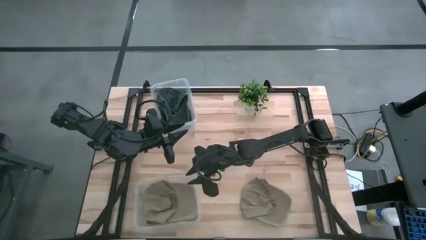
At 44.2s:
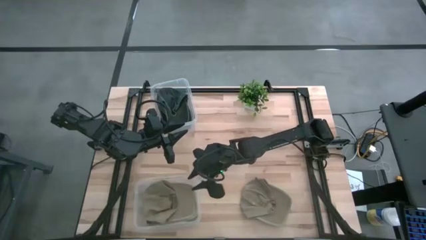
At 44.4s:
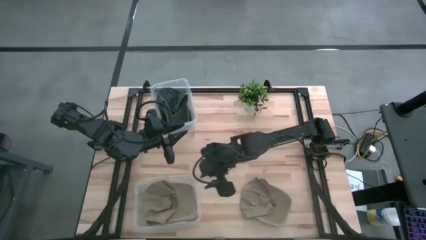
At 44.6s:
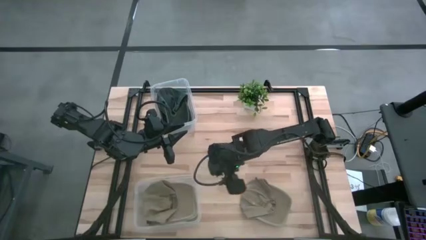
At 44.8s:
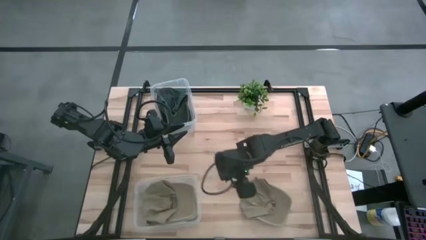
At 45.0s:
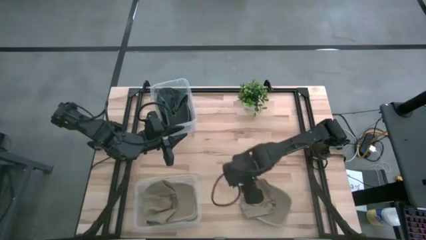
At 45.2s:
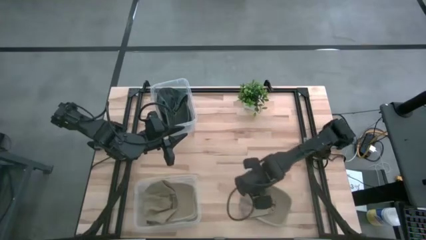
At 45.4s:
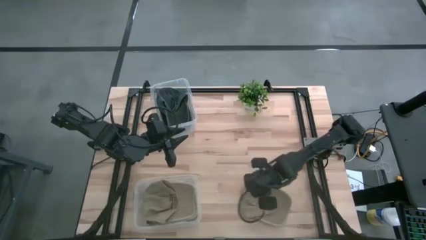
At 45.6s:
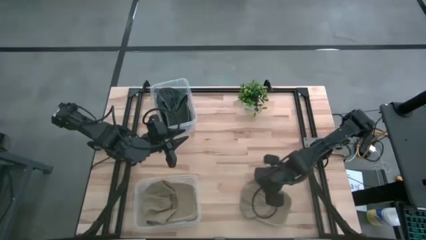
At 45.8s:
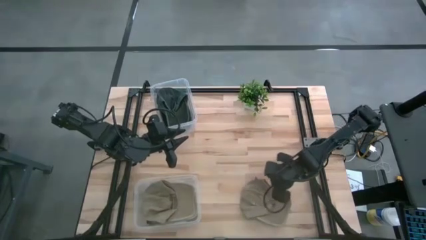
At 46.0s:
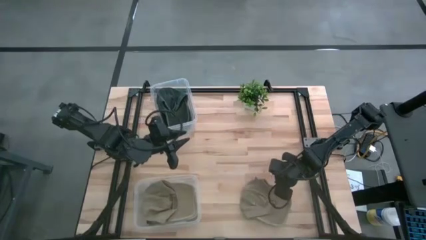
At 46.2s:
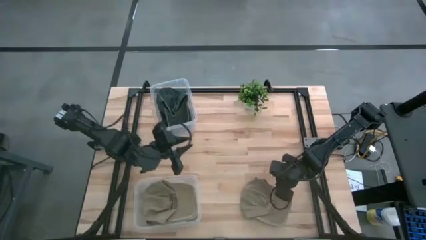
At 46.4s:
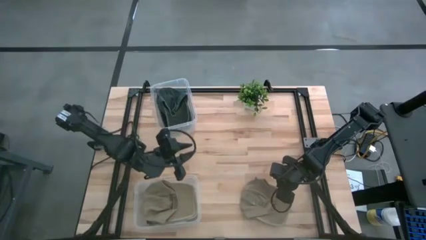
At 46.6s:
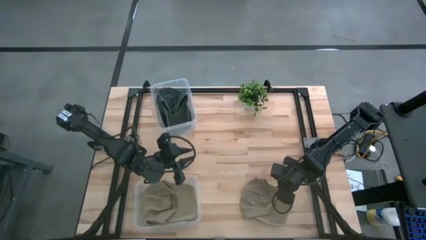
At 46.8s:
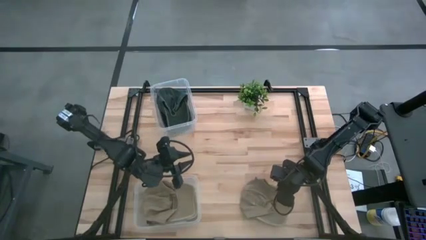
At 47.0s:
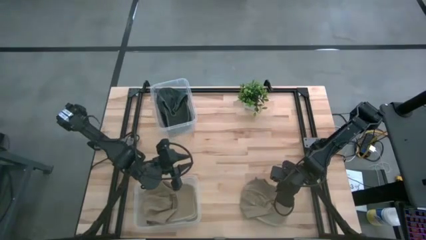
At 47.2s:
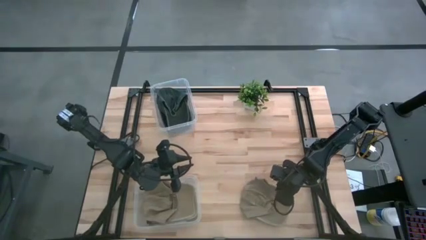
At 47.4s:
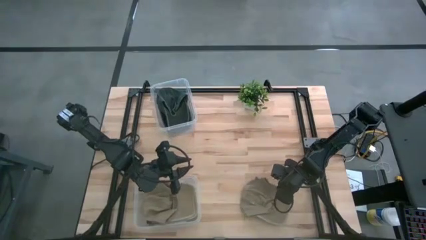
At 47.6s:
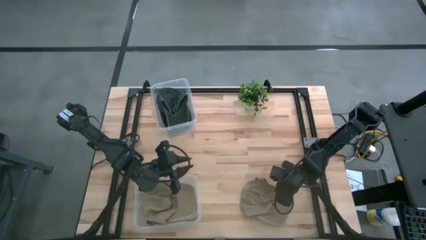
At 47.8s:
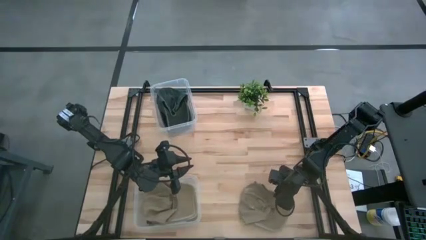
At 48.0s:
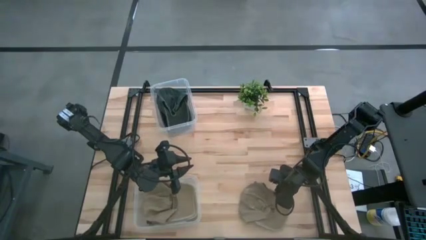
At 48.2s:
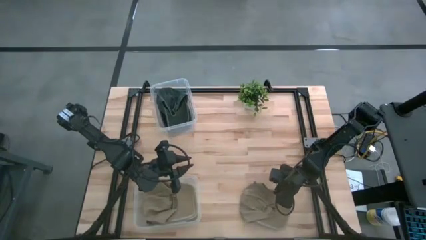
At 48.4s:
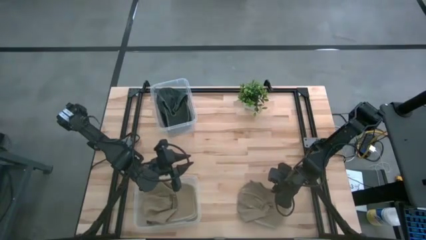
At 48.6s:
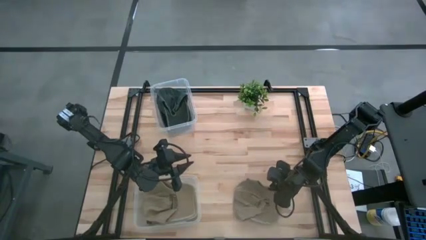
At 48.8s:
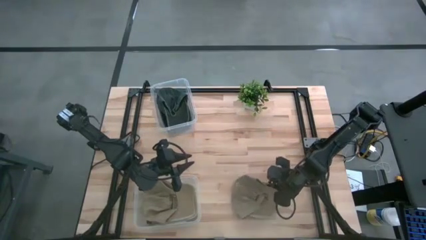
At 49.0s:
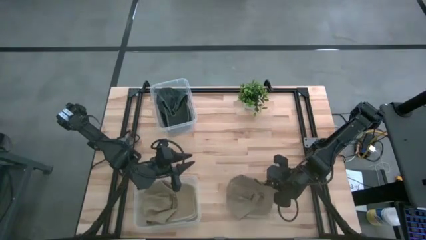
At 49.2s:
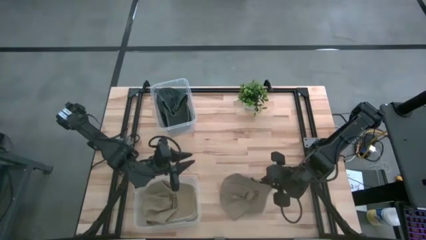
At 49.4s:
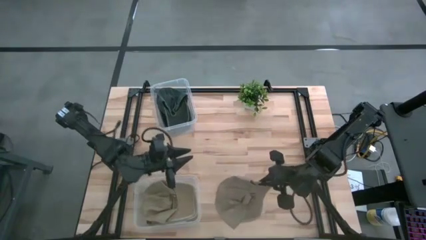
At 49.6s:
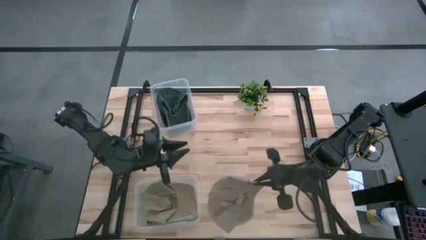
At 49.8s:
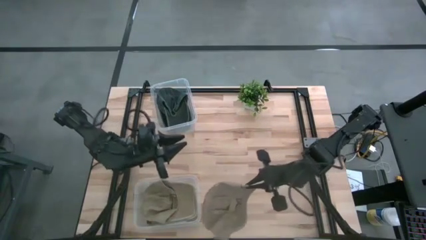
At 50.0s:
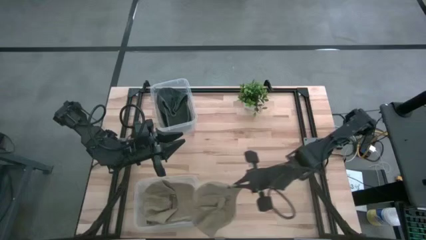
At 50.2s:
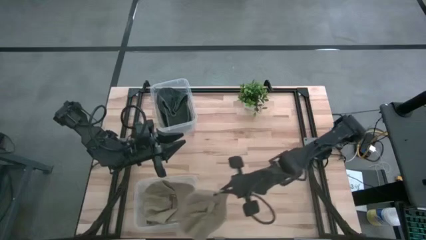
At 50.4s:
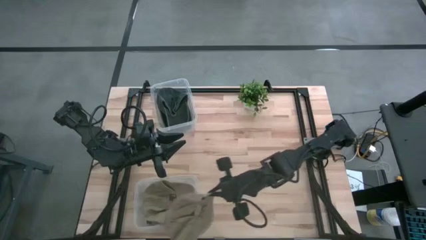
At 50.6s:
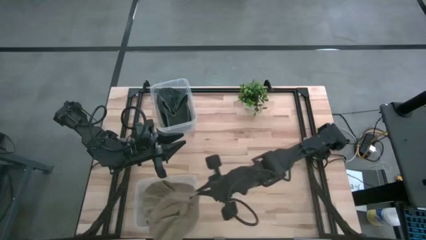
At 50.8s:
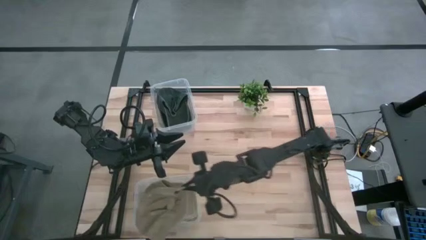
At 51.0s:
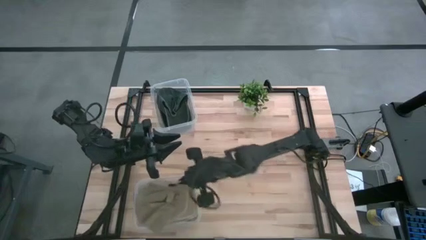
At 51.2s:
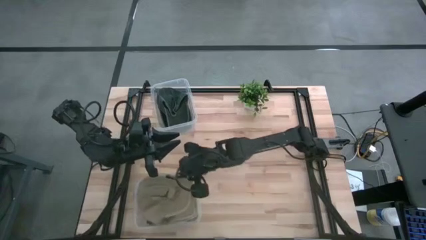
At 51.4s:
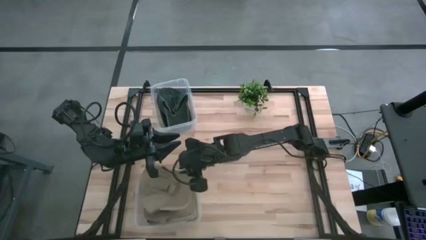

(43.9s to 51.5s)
Task: Pick & Place hat
Put the brown cap into the bottom transparent bin

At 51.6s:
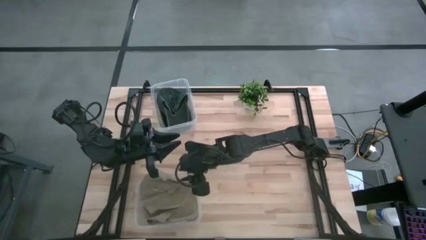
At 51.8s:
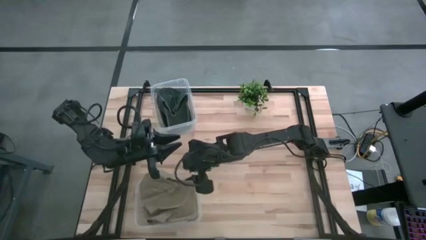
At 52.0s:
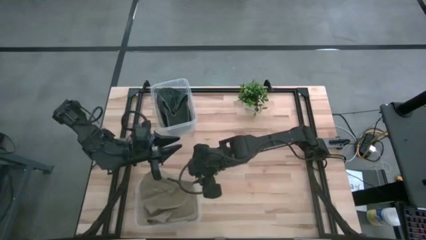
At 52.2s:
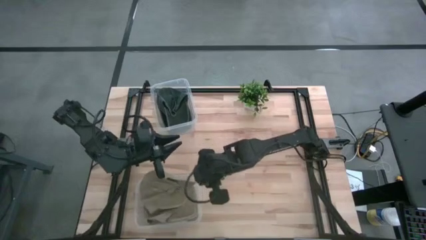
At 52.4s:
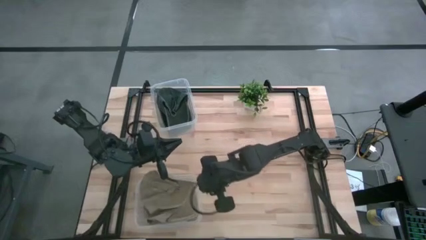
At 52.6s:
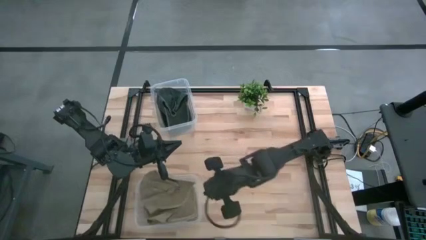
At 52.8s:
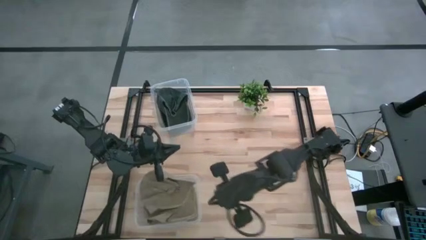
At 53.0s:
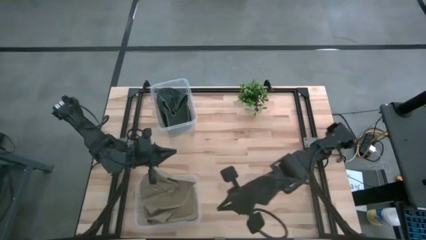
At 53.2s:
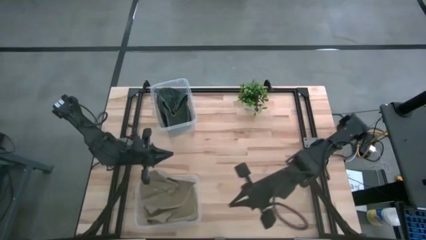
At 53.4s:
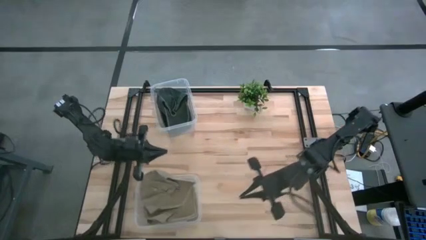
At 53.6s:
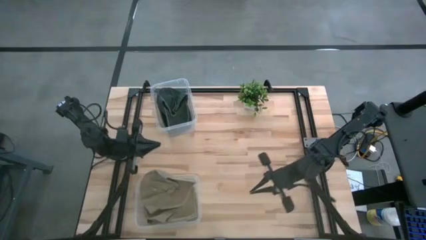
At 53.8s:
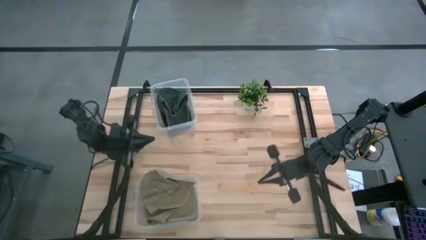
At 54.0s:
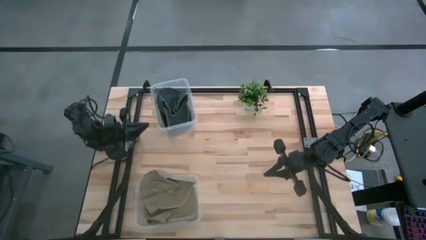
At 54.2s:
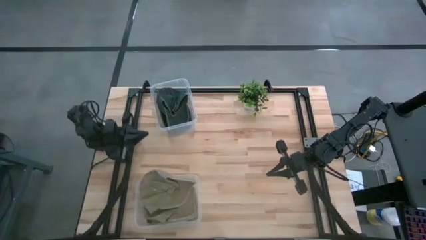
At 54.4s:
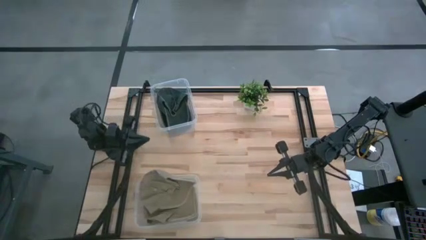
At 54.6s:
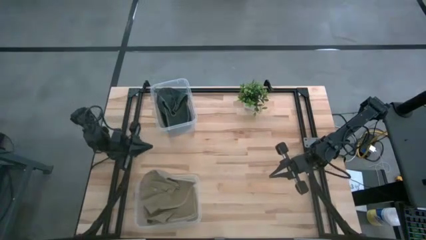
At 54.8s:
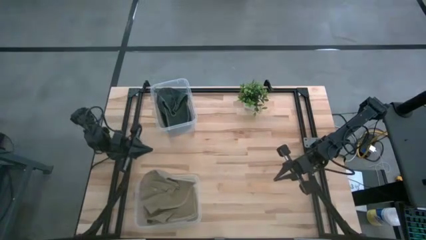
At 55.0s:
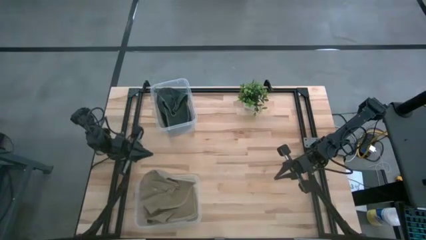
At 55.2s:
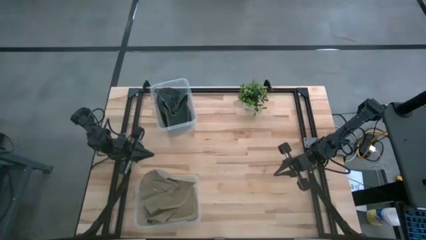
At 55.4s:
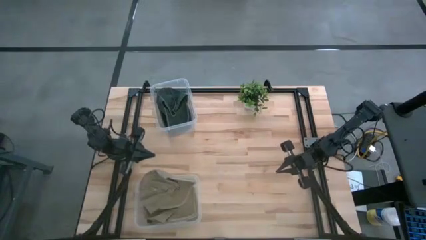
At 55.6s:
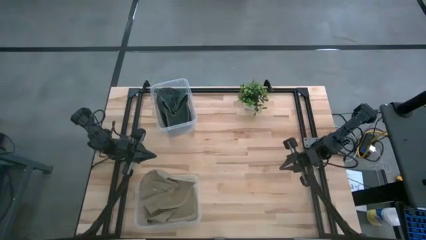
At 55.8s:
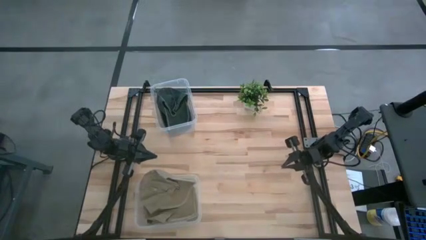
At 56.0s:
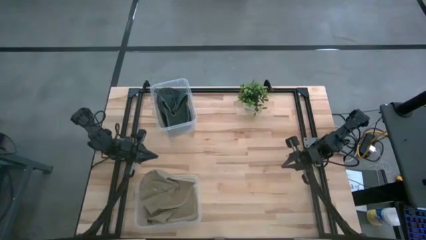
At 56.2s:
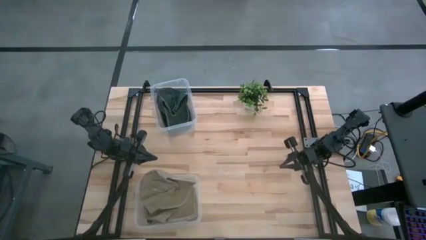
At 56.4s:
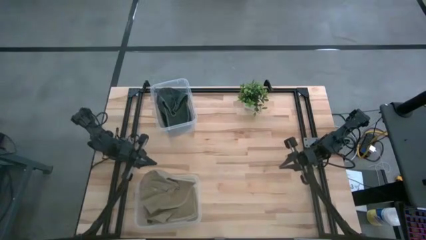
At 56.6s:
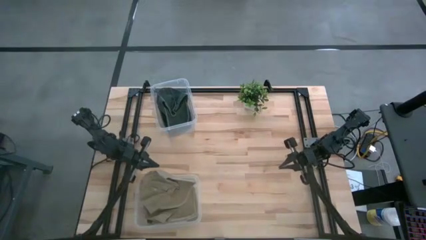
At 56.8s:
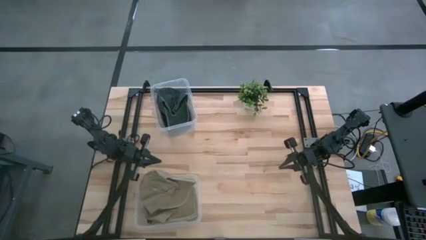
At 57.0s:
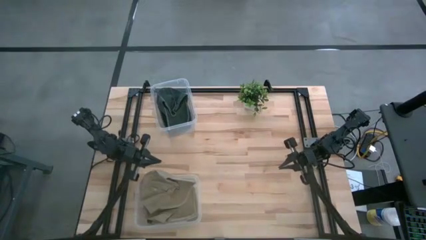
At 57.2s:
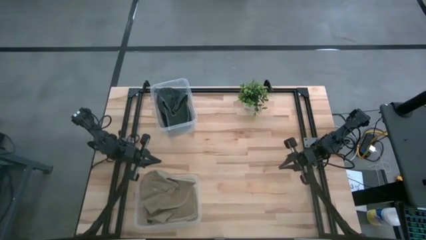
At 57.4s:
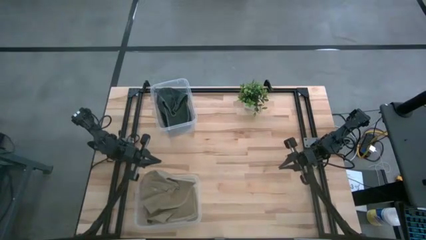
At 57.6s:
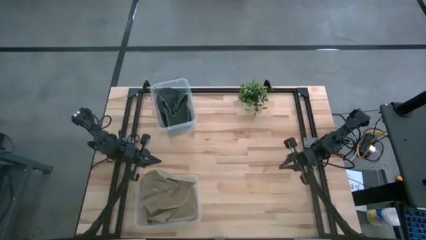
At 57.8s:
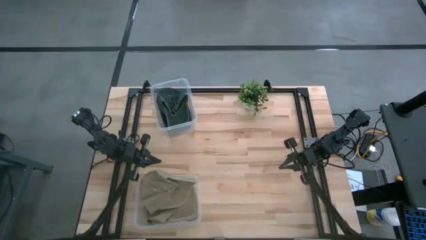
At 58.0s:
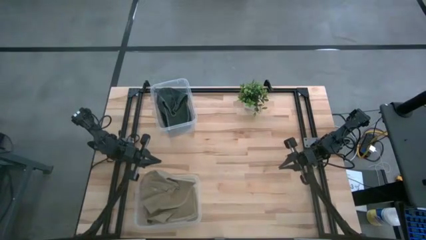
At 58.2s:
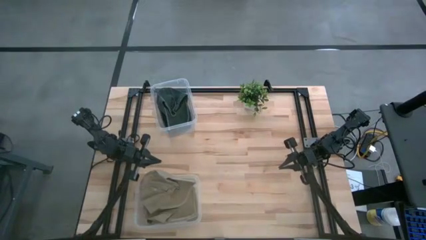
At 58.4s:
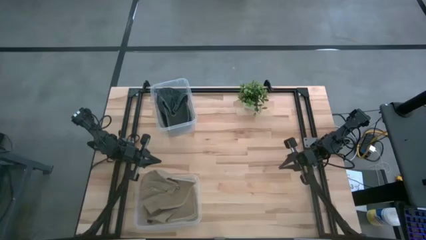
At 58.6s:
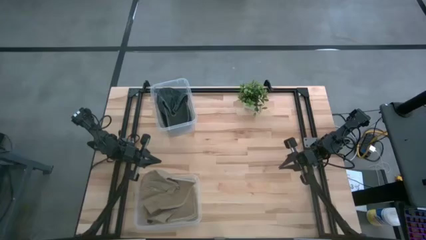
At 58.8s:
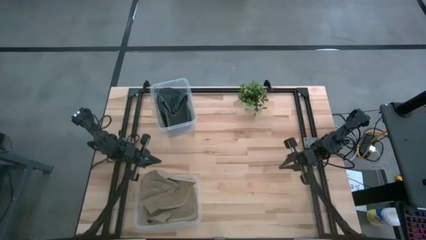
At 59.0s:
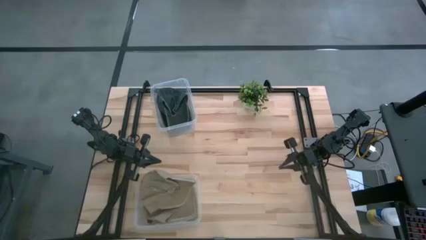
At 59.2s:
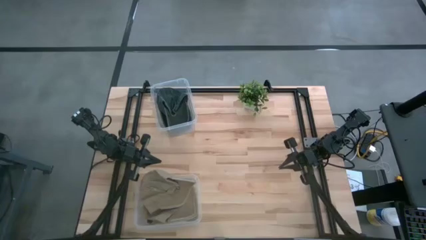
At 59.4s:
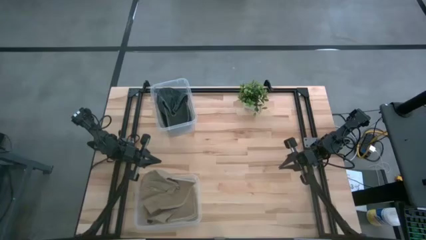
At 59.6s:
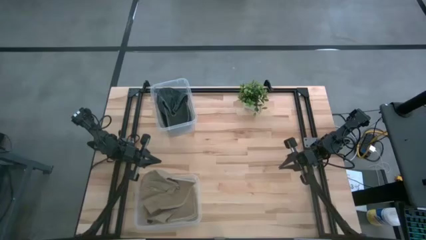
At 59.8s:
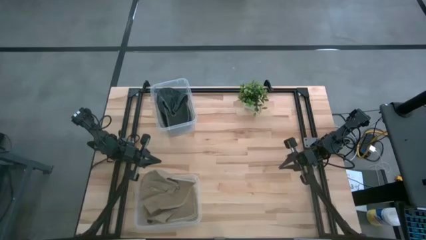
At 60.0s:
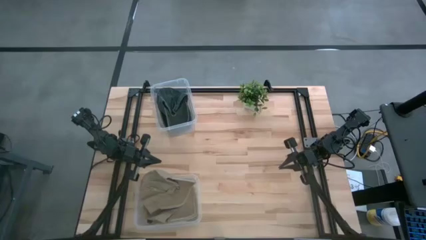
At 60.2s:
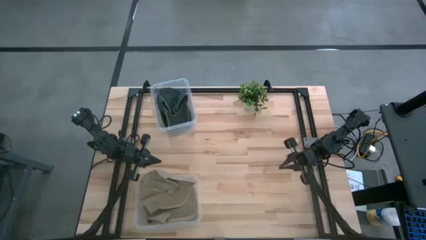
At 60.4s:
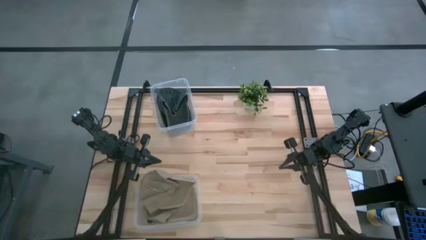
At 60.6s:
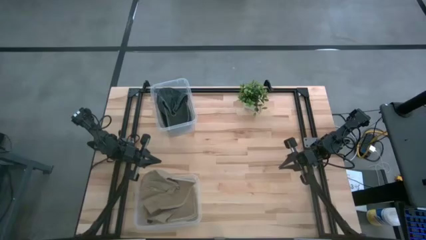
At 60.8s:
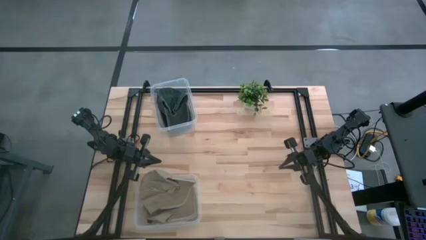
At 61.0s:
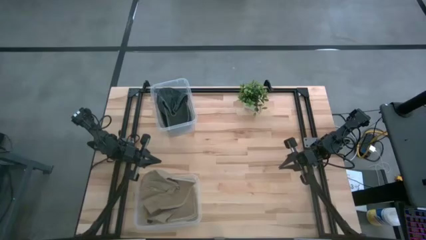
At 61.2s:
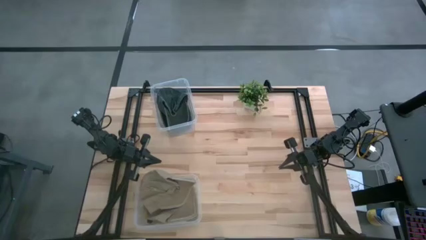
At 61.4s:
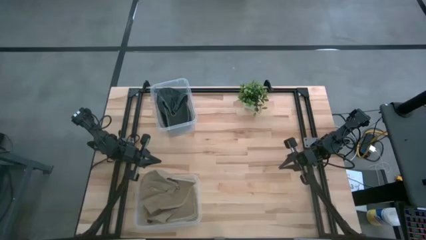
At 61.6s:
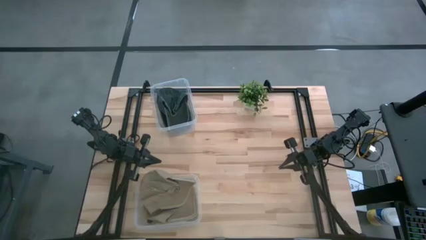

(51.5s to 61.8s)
Return to home position
